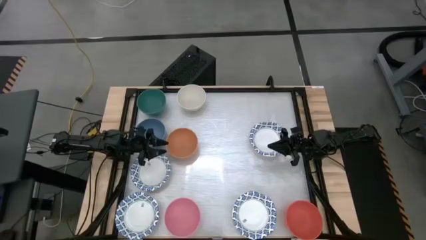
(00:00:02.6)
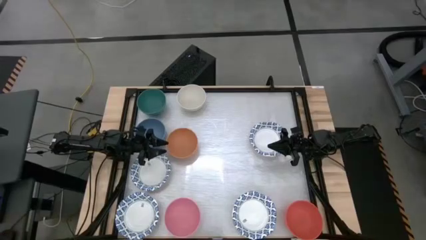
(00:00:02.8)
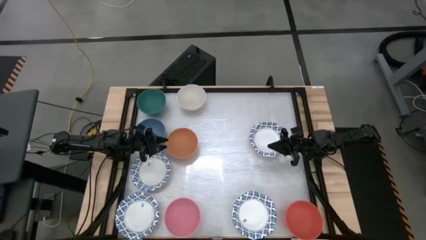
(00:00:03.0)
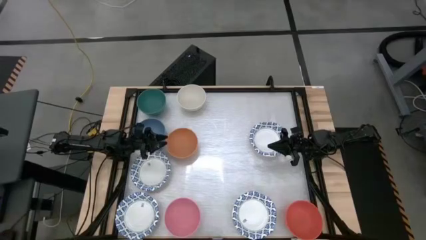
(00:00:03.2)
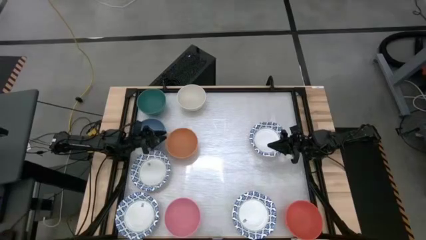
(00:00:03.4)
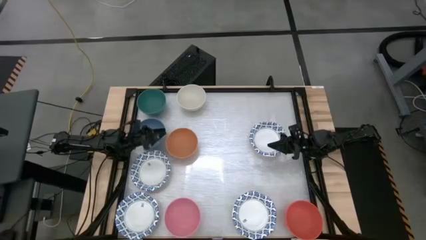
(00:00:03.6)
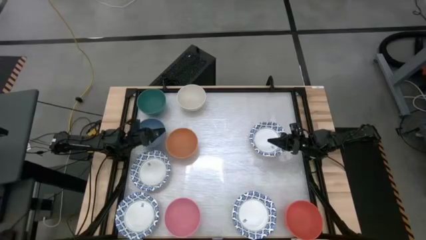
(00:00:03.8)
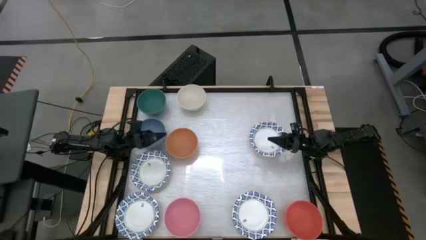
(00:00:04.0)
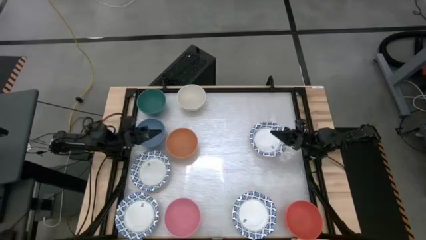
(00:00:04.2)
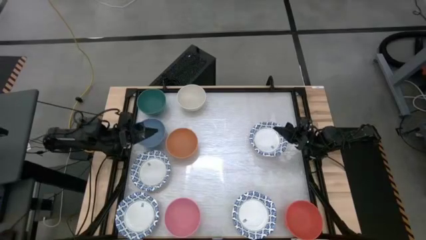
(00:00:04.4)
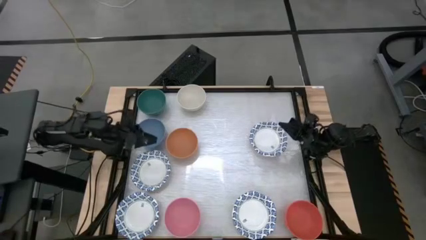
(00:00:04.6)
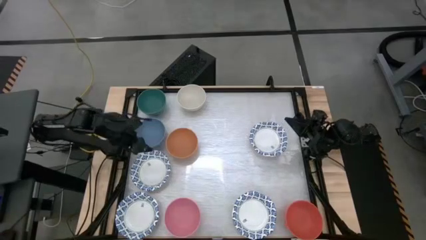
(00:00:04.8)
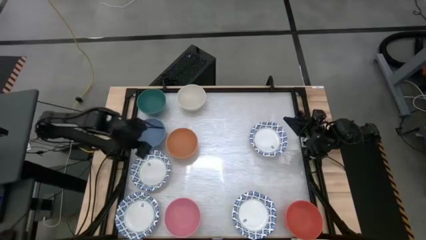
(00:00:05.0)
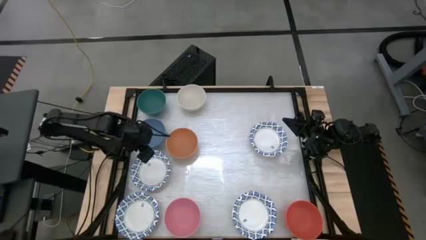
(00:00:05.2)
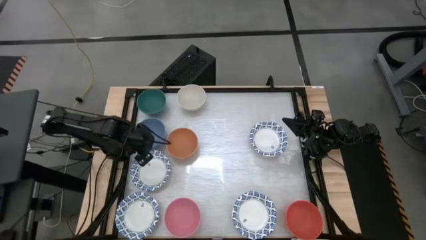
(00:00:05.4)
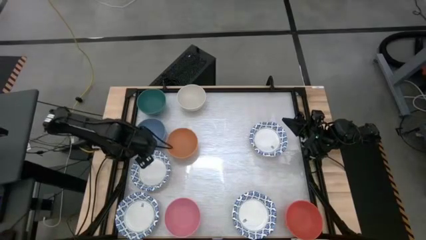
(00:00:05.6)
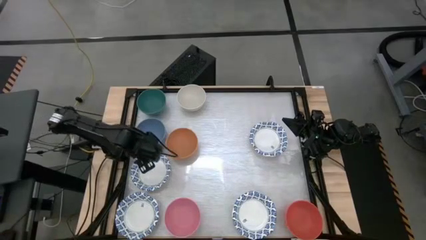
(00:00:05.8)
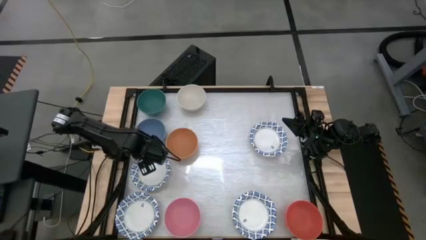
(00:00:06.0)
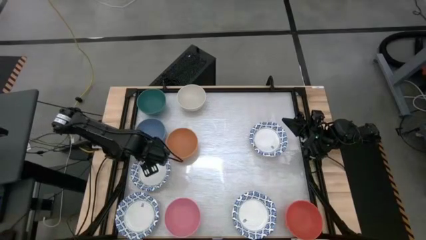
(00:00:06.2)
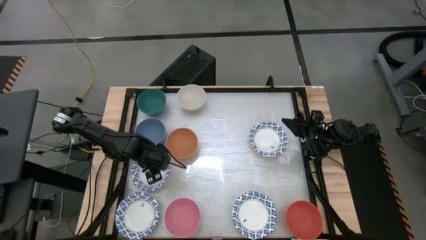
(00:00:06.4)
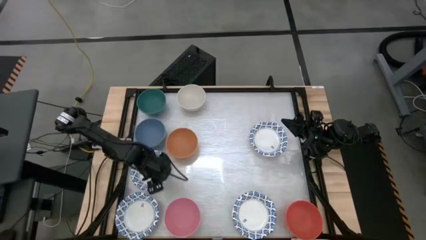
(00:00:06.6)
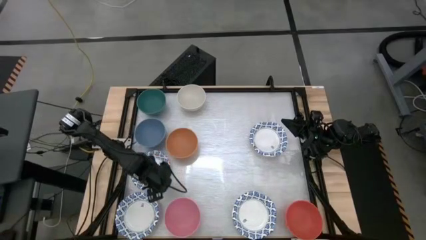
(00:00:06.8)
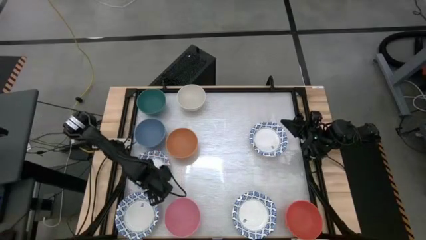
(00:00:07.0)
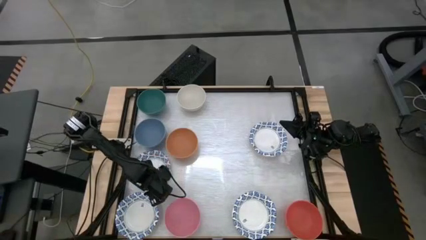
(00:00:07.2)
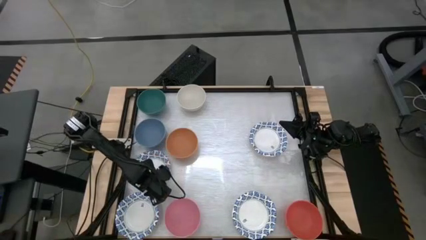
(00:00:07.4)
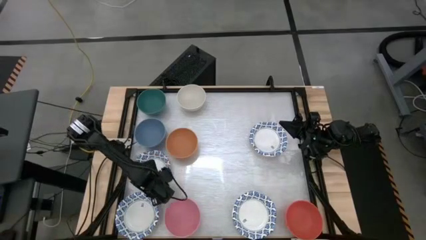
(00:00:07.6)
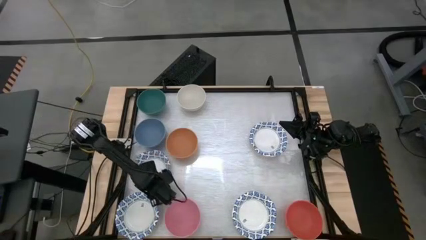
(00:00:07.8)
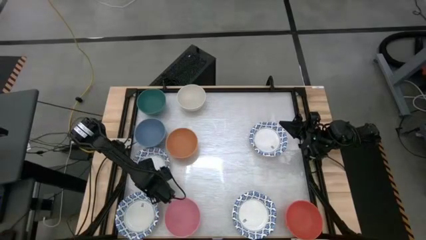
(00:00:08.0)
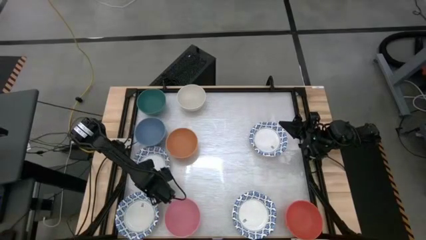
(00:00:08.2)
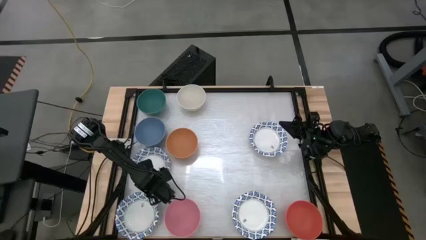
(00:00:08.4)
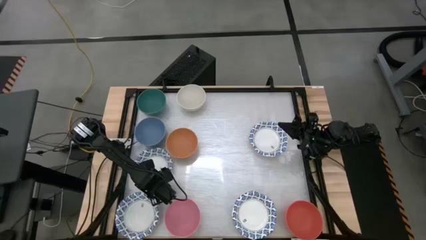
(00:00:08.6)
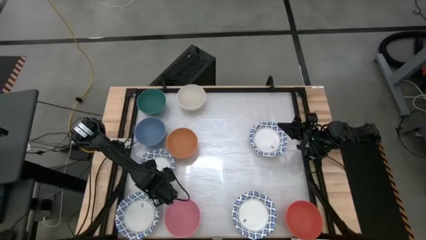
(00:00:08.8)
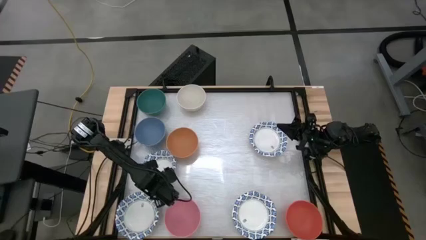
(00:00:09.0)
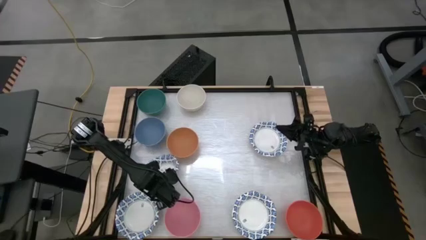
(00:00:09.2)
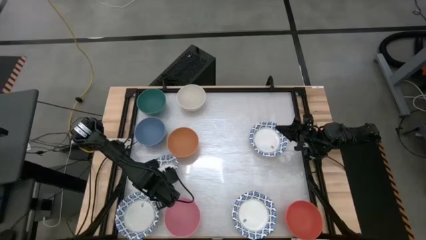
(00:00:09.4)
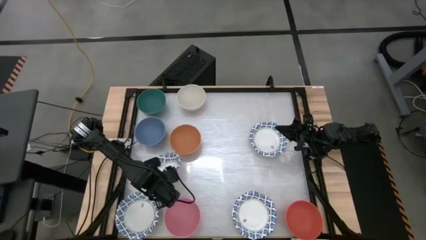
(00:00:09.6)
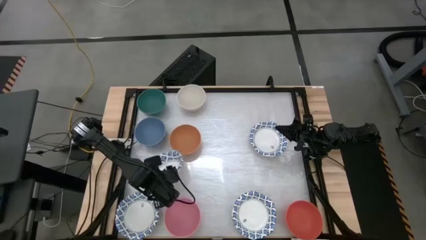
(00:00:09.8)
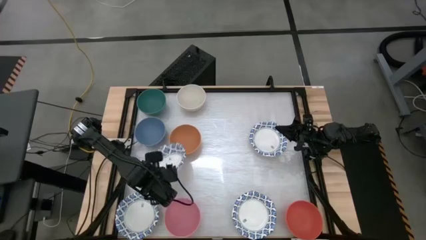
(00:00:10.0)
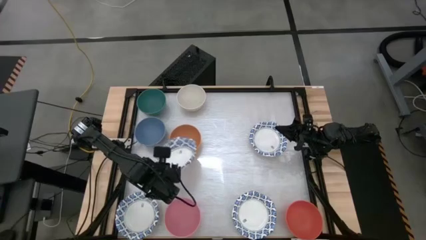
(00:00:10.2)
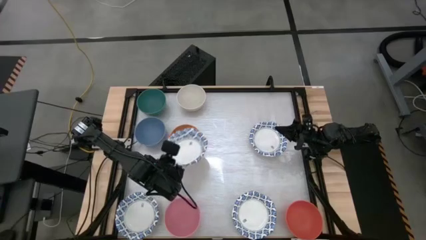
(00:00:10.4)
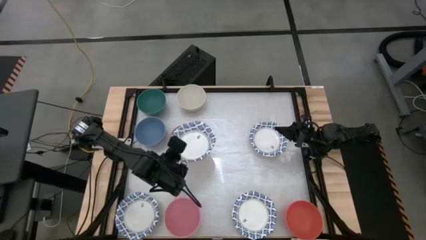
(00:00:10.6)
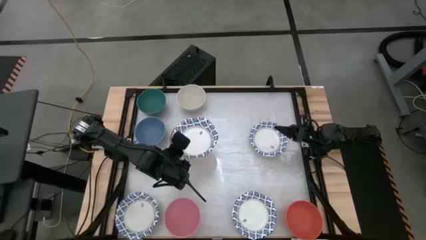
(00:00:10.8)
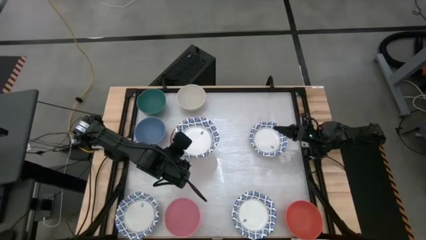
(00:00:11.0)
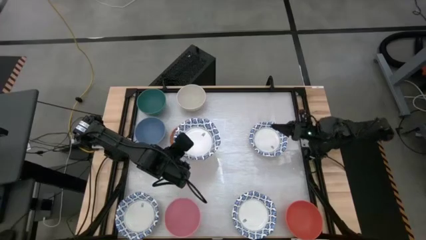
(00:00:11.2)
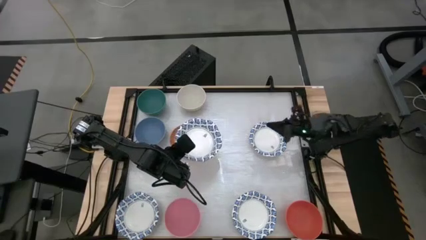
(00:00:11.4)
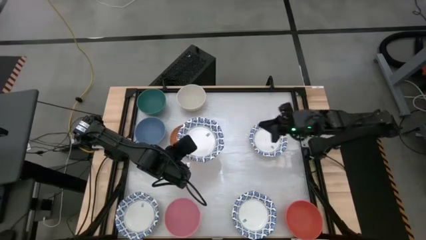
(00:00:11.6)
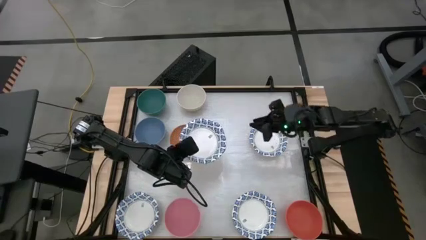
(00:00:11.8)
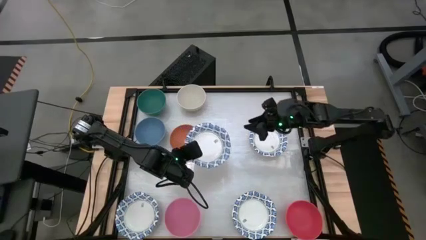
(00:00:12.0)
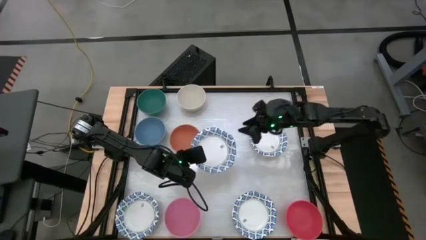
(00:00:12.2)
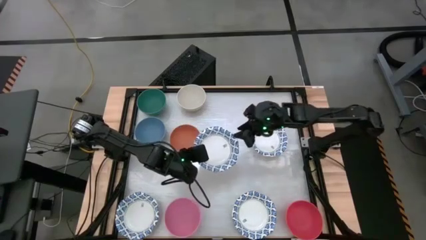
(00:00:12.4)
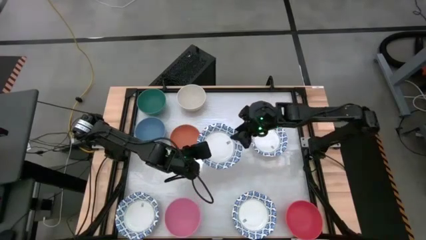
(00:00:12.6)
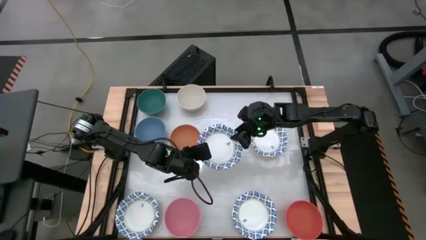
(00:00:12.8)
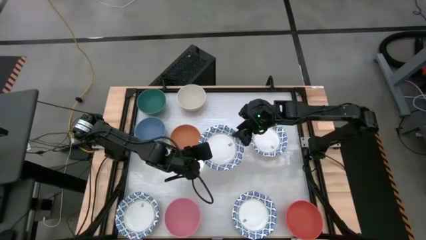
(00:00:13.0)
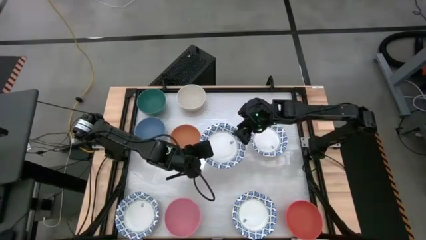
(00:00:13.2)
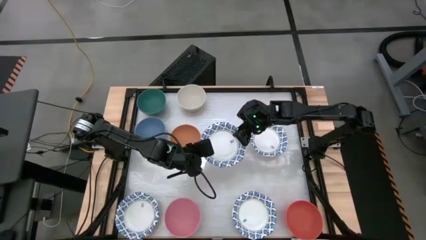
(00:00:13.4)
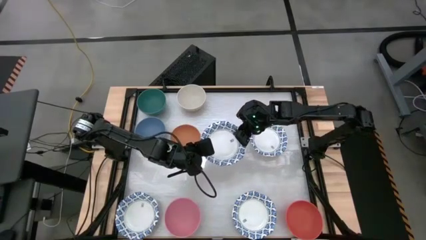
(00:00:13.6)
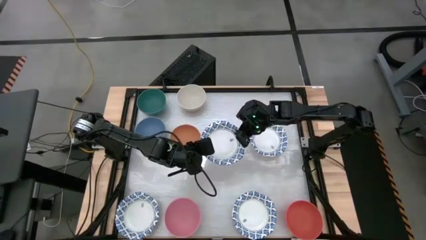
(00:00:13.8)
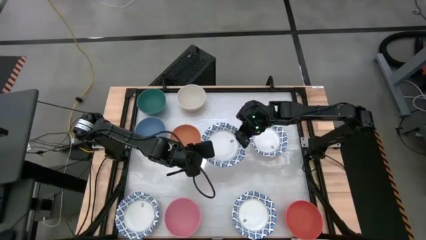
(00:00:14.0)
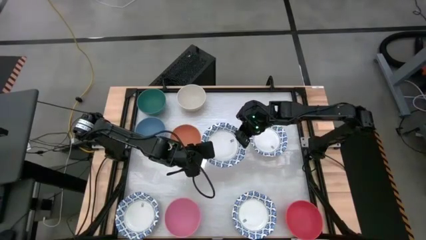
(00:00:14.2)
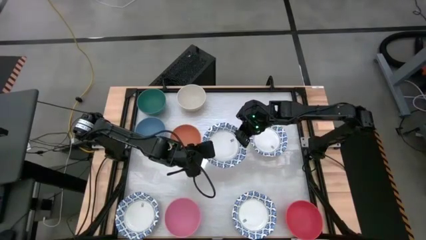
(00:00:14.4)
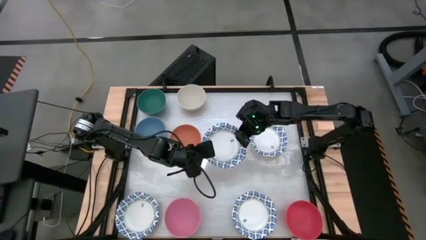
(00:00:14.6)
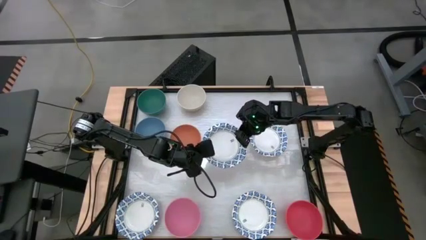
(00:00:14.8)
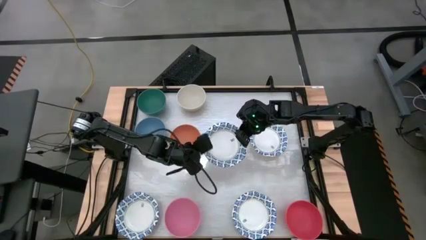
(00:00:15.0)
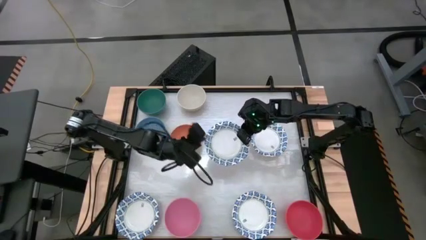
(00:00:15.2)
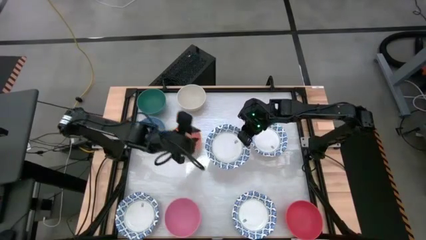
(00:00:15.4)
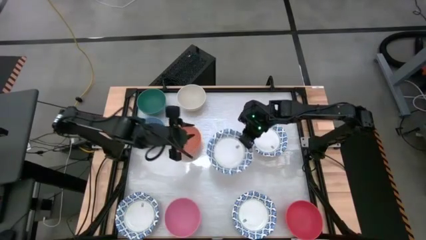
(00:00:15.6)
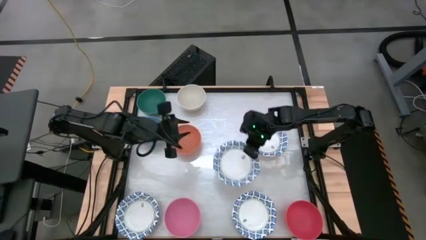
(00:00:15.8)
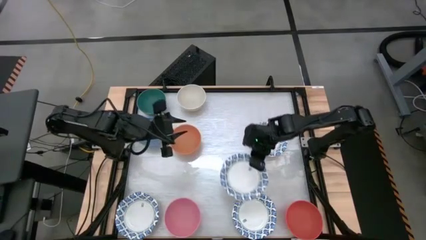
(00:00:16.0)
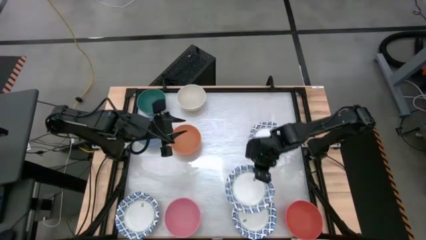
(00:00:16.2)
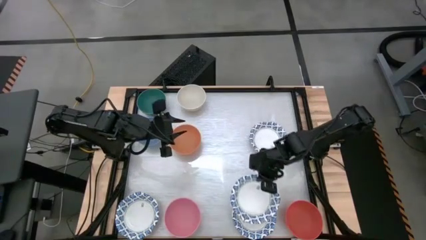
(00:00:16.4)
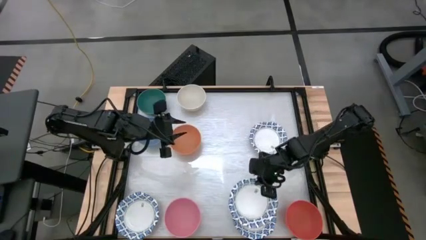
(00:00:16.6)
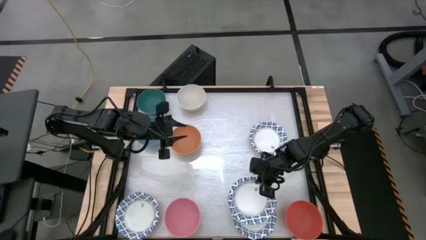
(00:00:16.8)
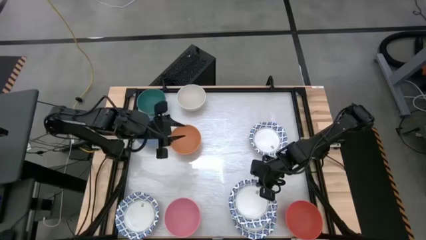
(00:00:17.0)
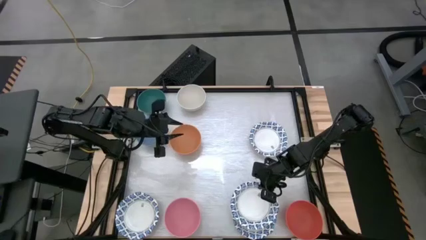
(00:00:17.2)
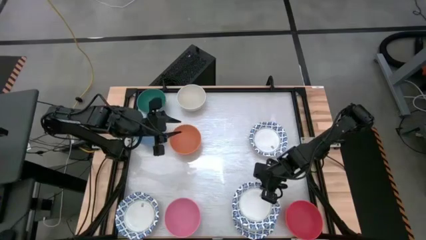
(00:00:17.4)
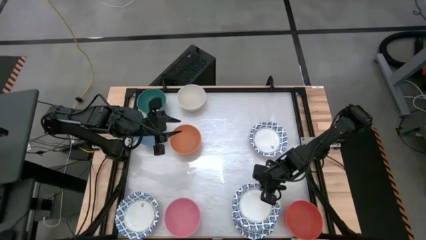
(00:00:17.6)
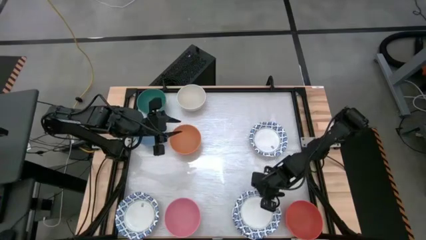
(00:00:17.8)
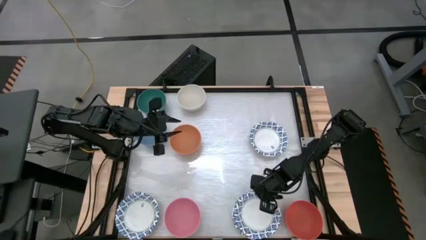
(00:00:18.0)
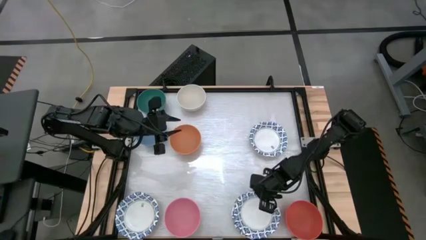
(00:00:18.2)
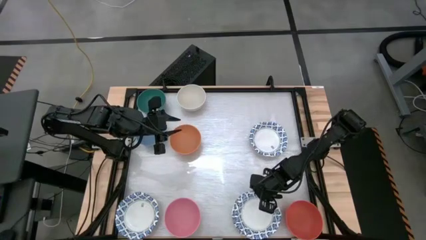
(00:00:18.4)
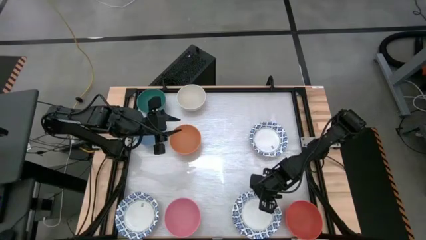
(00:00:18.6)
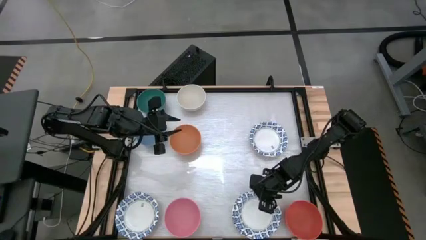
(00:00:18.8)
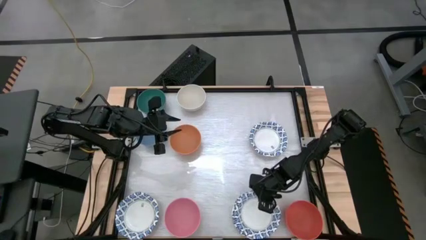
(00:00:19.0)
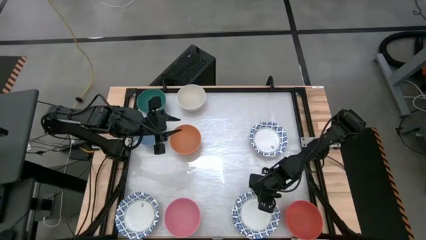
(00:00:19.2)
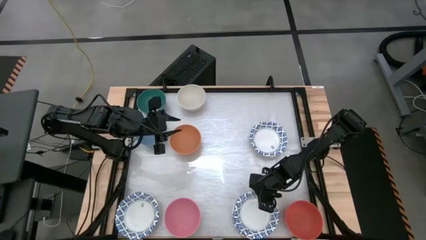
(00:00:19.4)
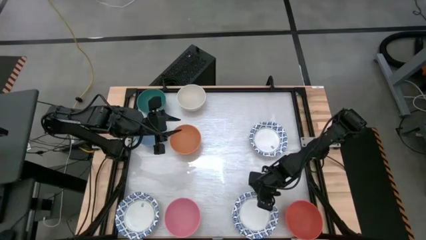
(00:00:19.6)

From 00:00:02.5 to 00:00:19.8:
Stack the top left white paper bowl on top of the bottom right white paper bowl
